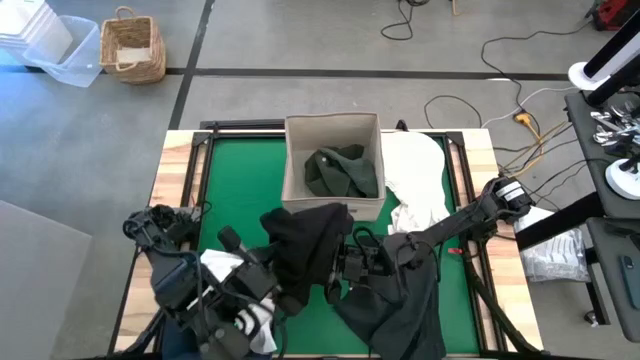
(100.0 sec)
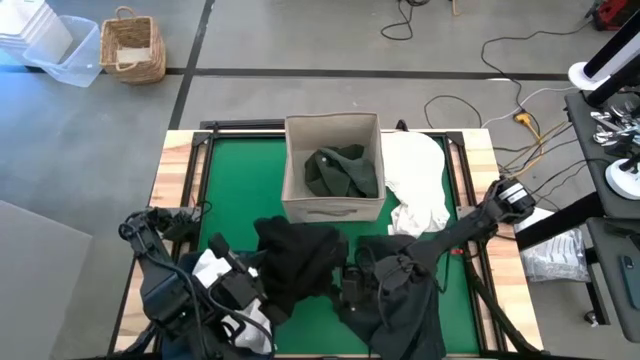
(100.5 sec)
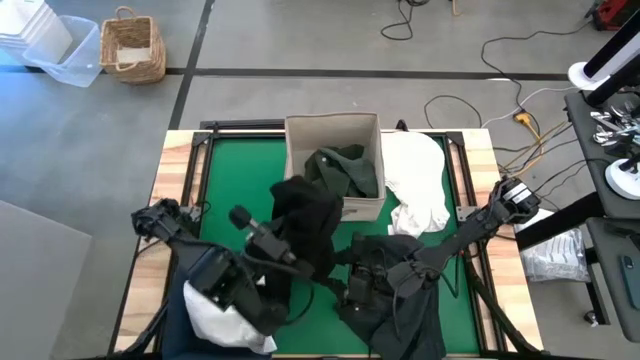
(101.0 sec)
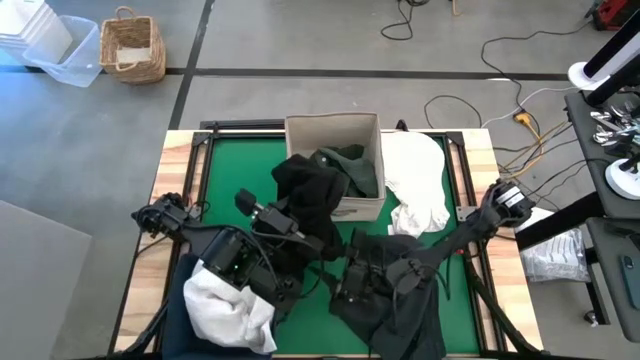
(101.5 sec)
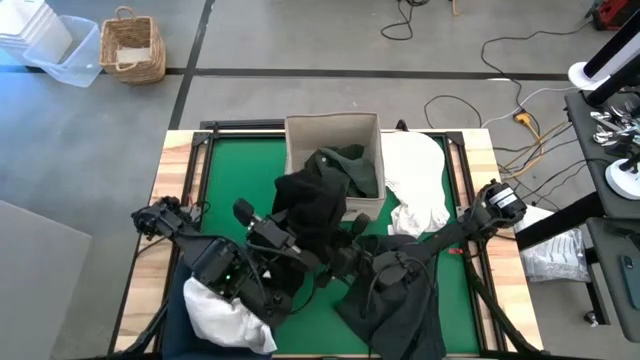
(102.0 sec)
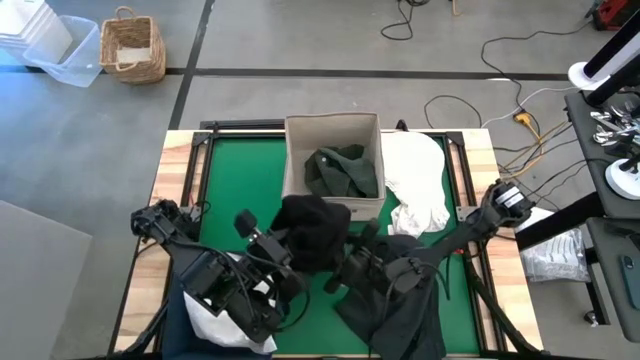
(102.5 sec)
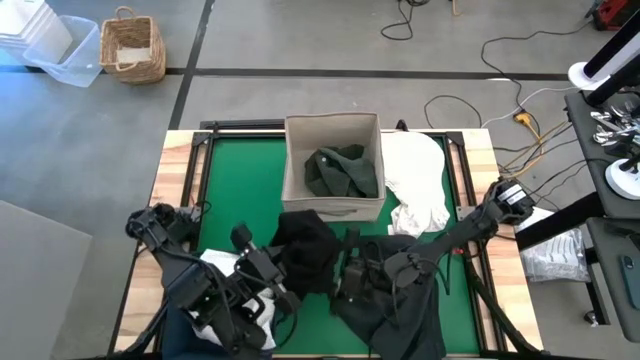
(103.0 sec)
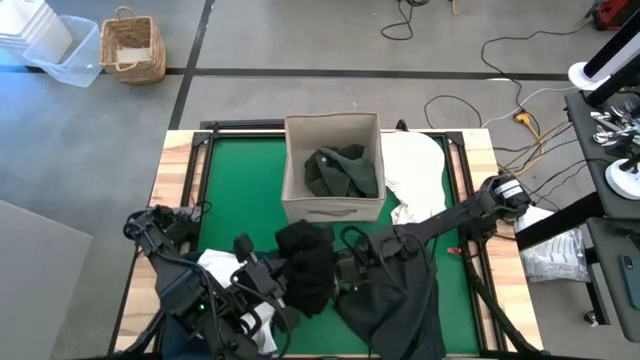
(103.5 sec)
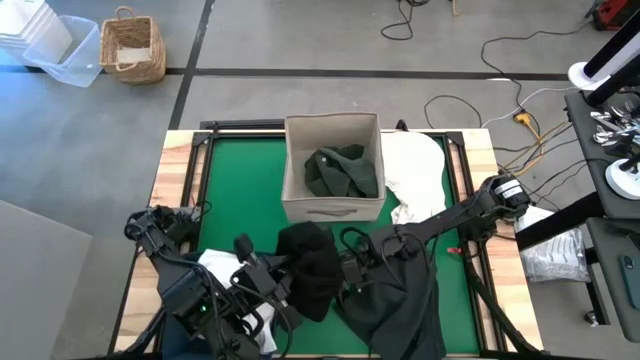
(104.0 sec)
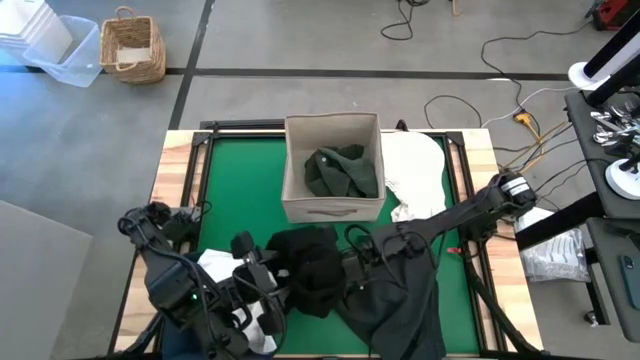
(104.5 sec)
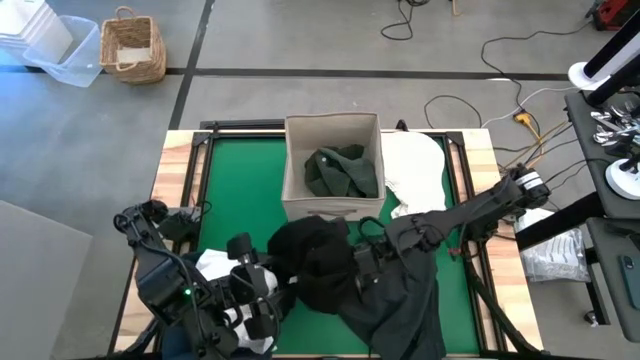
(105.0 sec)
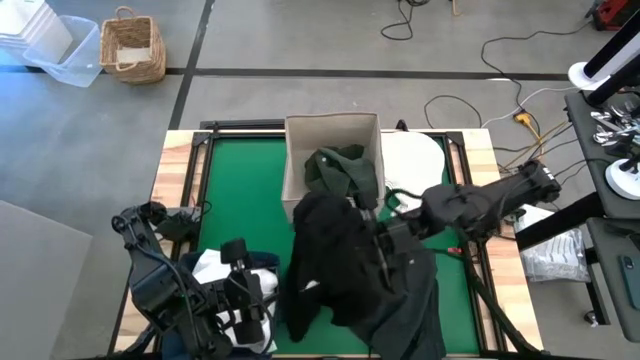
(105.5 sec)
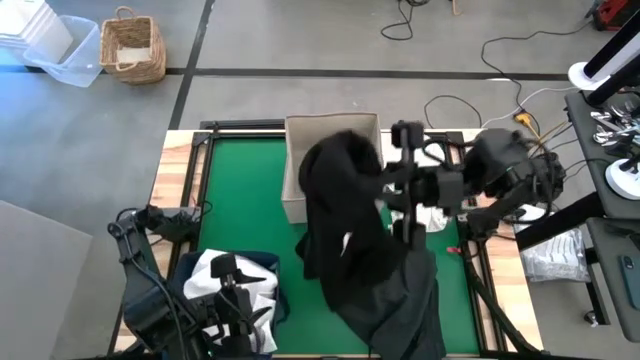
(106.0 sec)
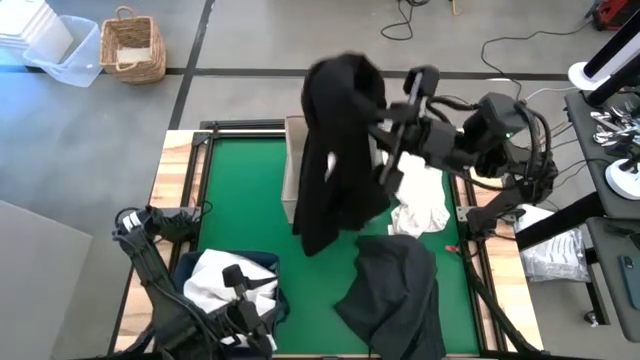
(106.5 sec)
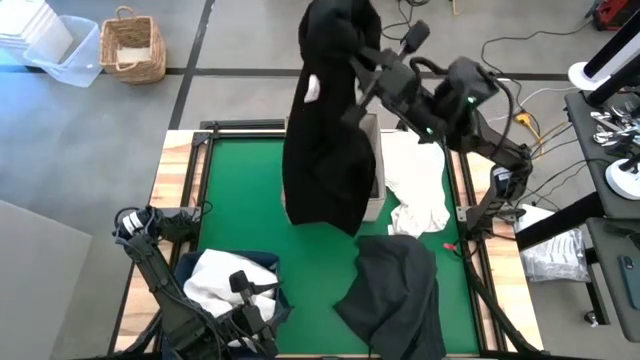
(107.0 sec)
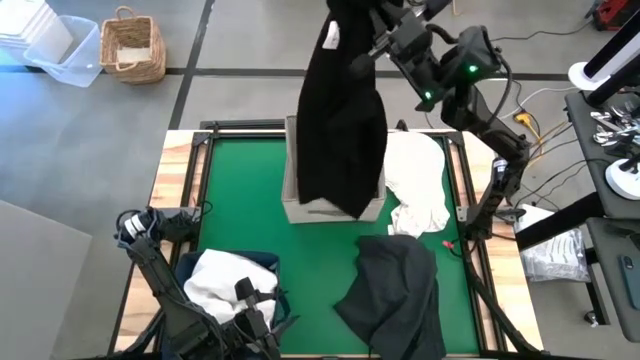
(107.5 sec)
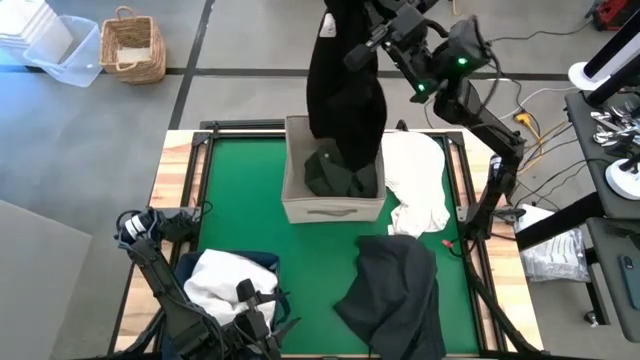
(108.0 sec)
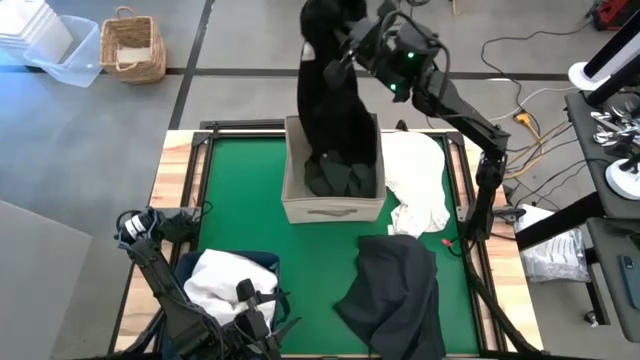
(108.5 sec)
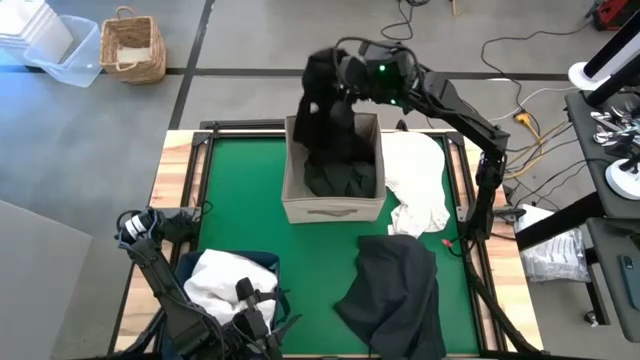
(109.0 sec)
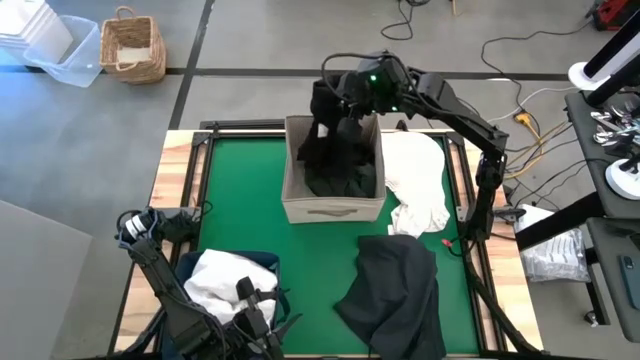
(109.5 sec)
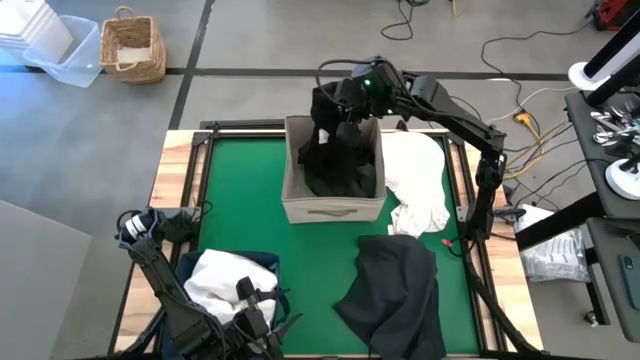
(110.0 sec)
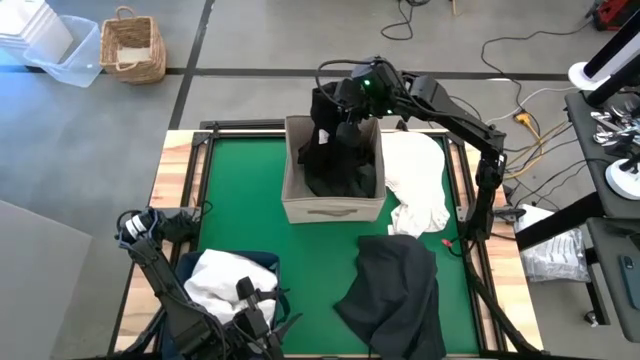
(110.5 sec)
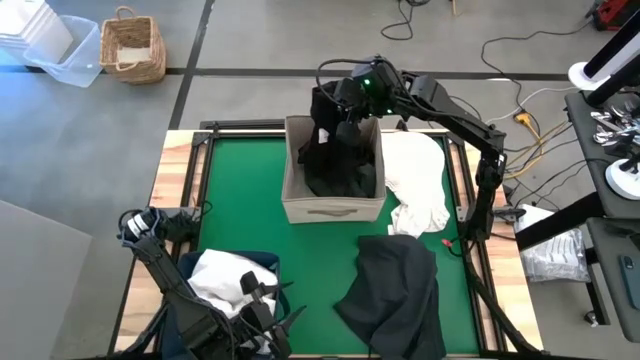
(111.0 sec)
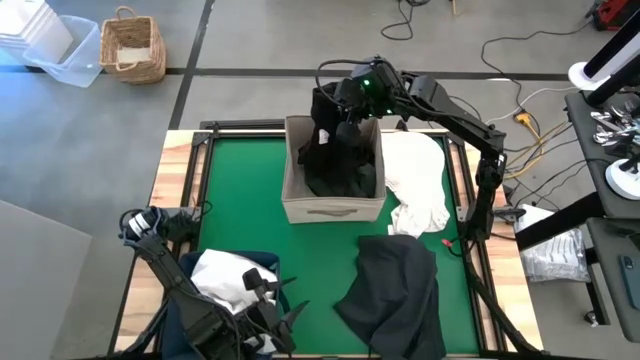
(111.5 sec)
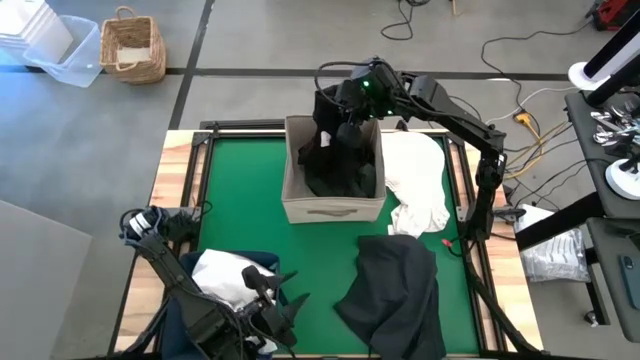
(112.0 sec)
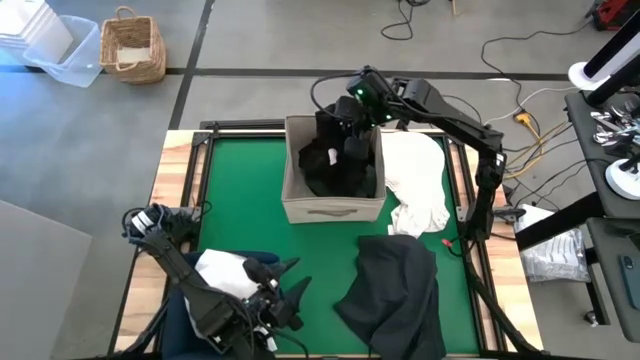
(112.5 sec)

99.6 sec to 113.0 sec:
Put the black shirt into the brown laundry bin

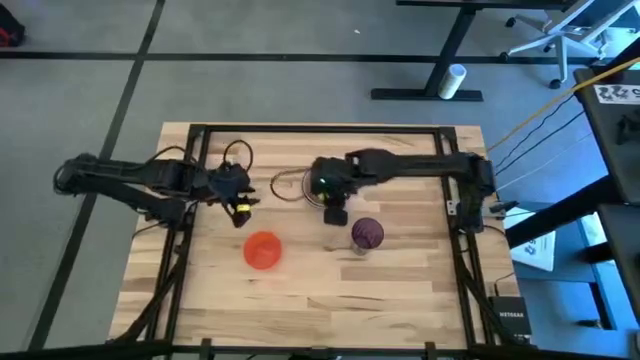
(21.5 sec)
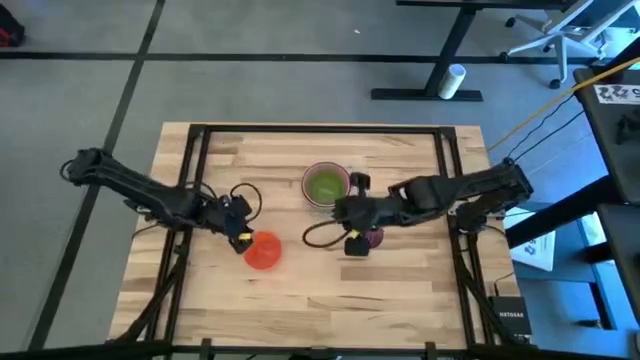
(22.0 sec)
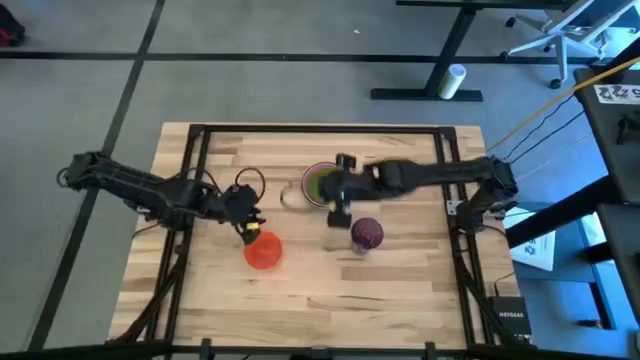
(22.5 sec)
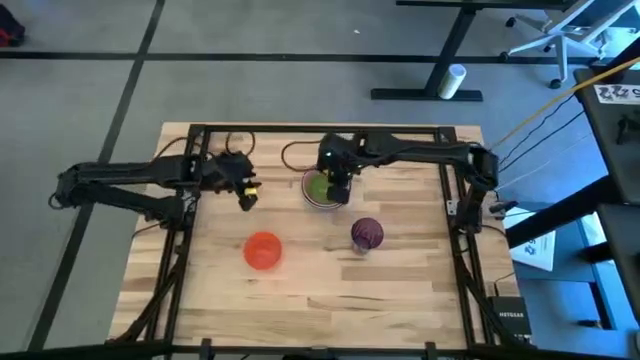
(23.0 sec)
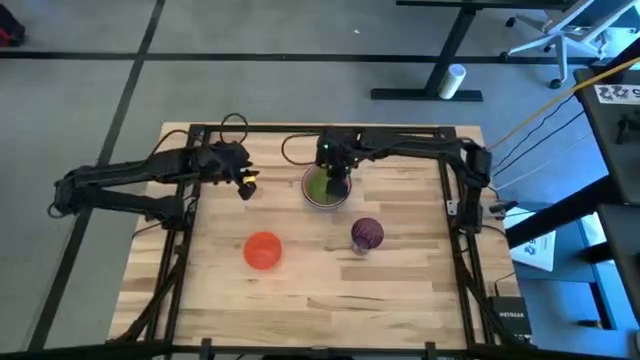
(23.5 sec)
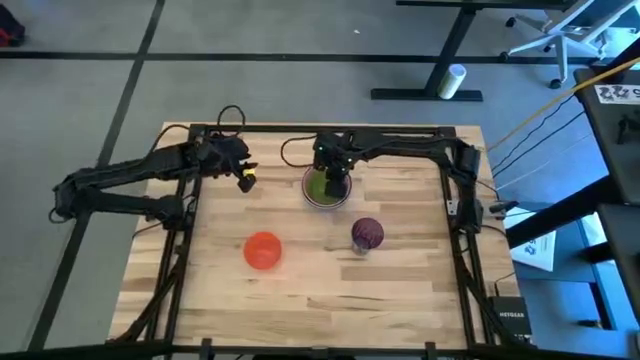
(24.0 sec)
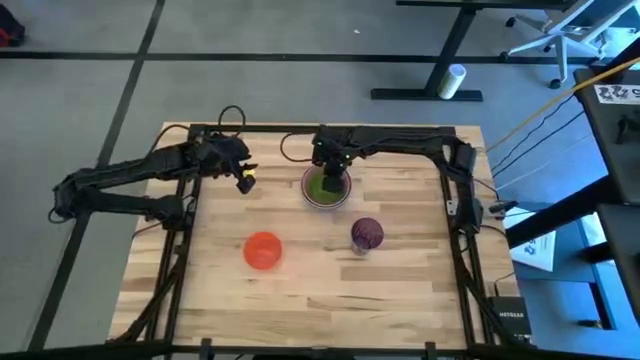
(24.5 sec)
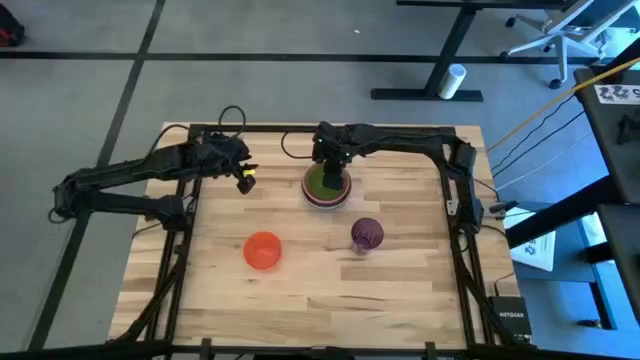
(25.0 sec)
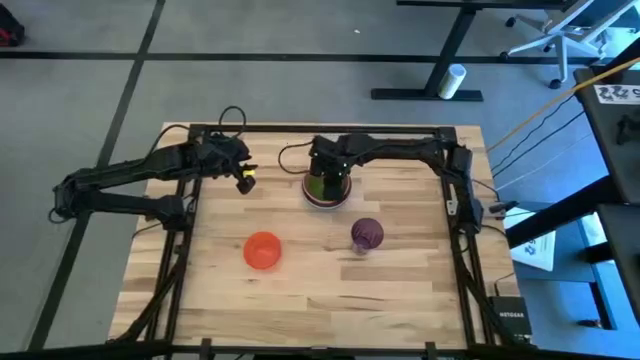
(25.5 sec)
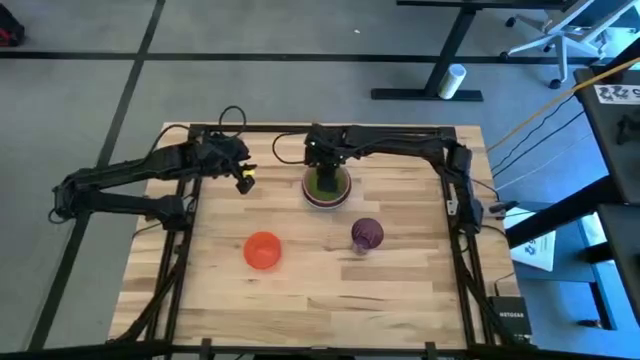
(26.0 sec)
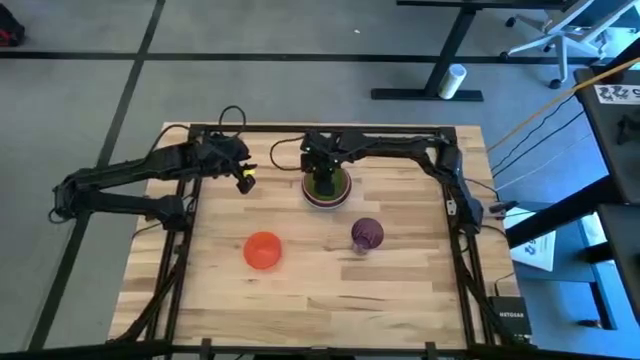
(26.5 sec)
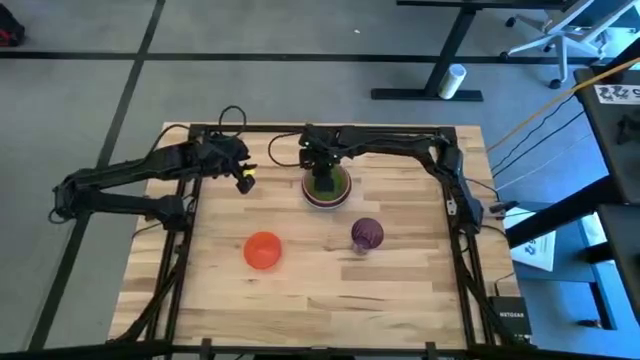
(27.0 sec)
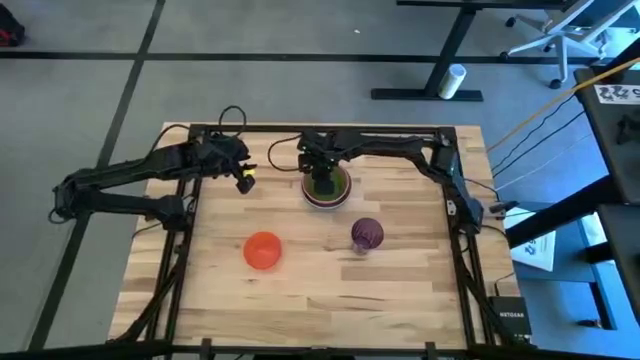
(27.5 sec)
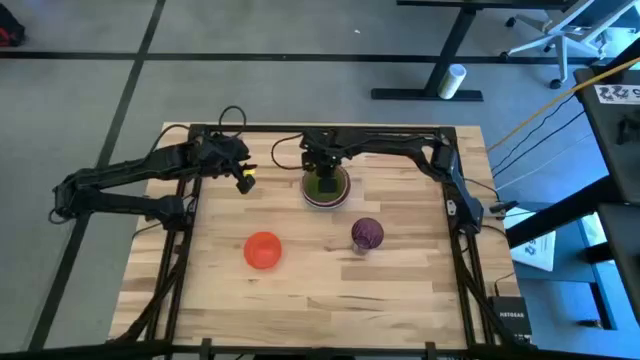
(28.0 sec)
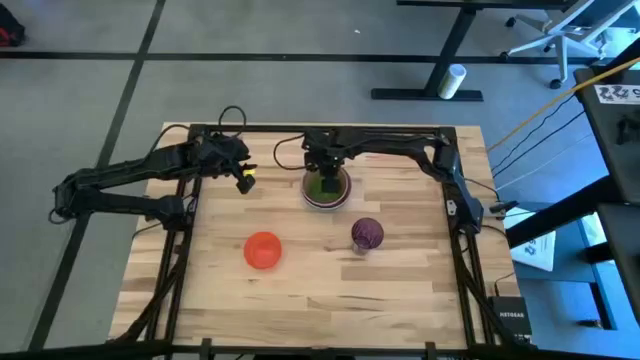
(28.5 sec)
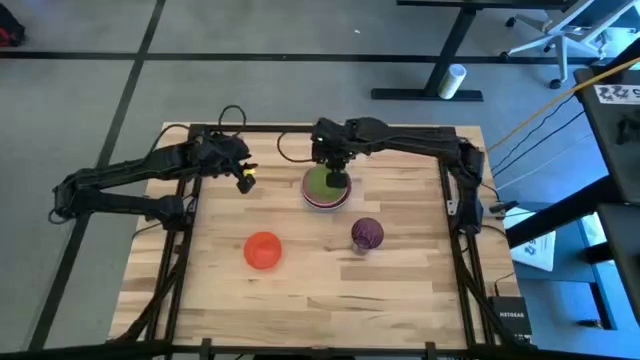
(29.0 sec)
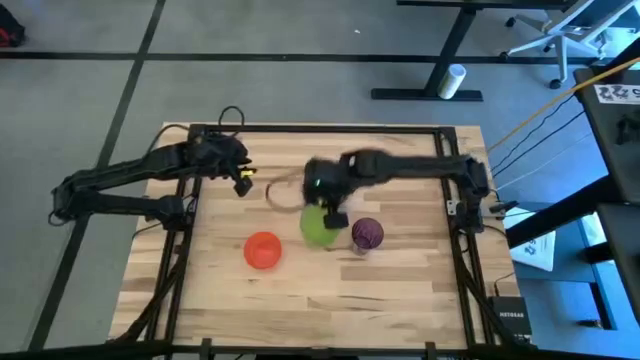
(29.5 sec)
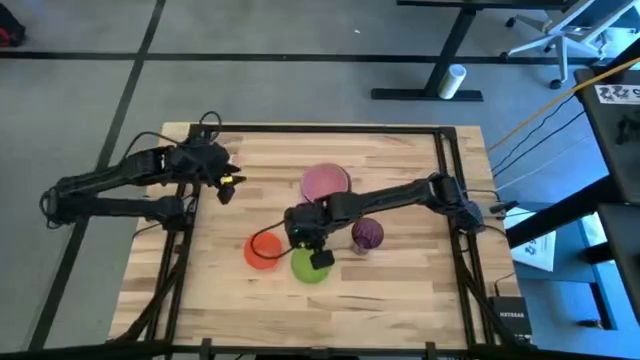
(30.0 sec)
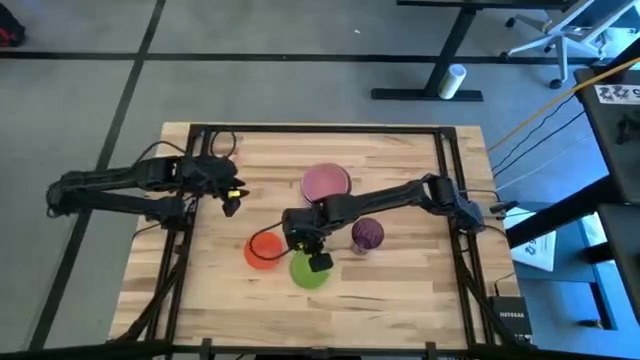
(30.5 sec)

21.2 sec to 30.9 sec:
Remove the green bowl from the pink bowl
